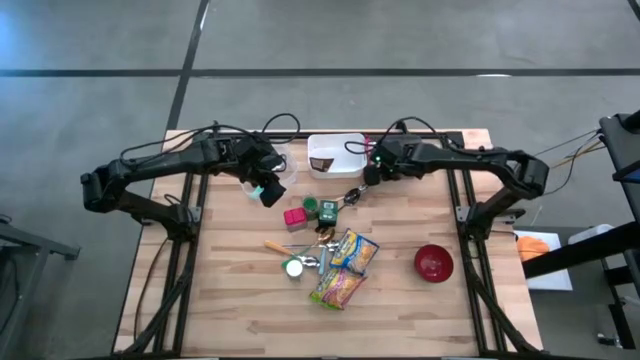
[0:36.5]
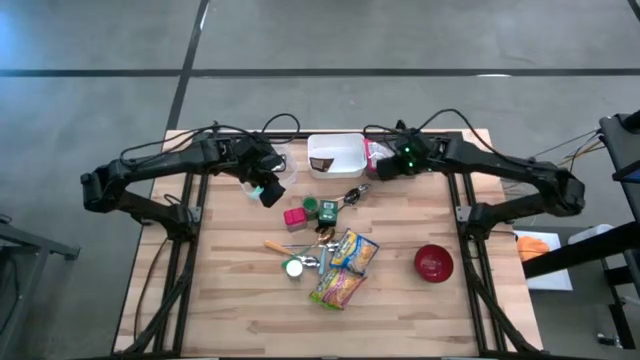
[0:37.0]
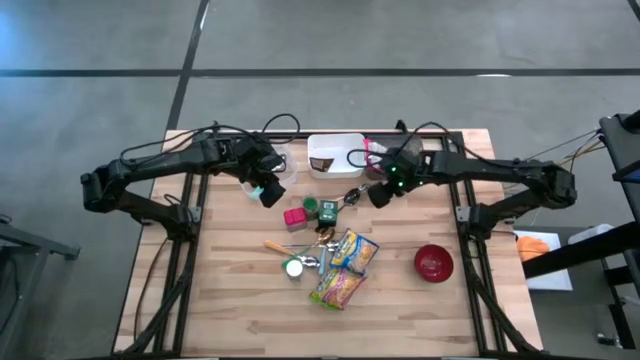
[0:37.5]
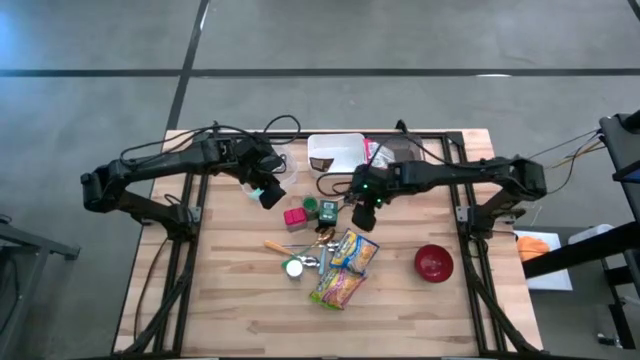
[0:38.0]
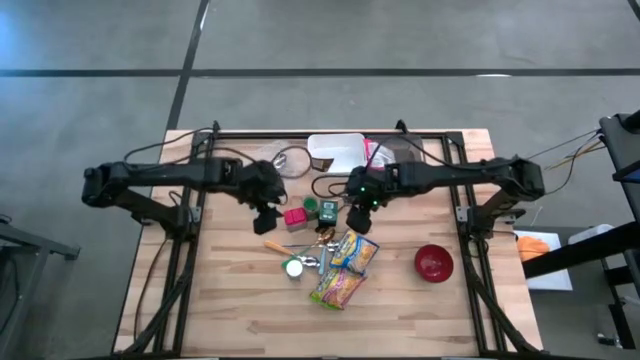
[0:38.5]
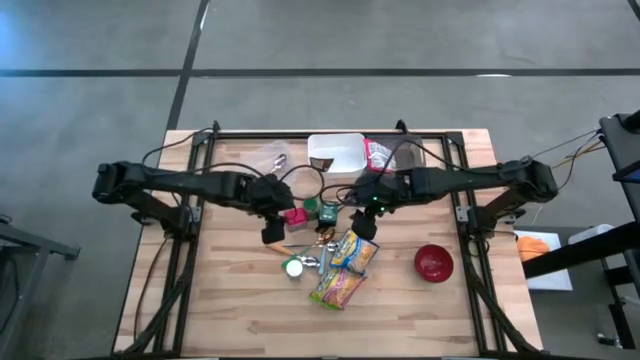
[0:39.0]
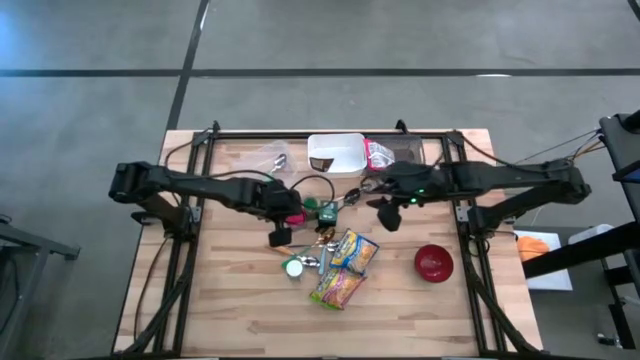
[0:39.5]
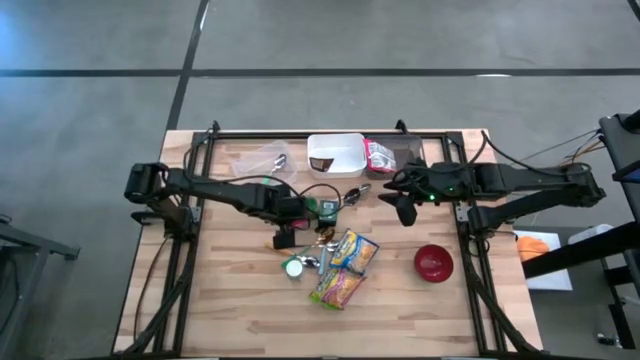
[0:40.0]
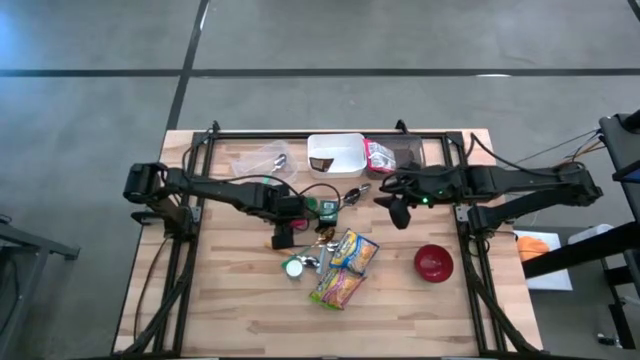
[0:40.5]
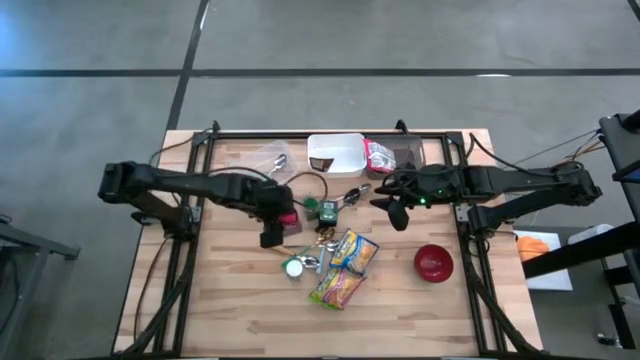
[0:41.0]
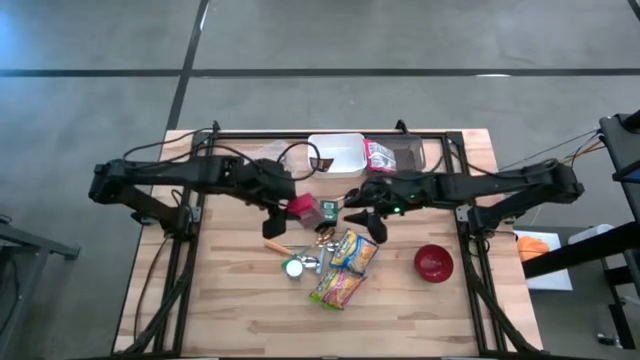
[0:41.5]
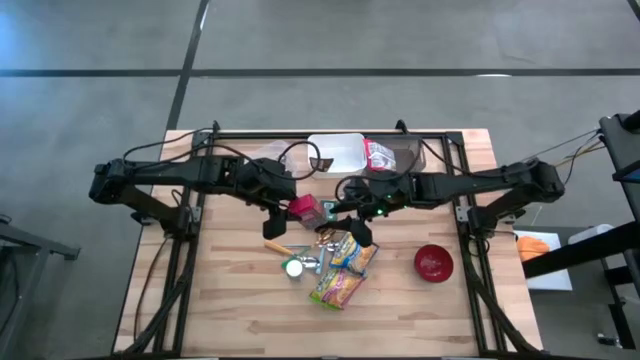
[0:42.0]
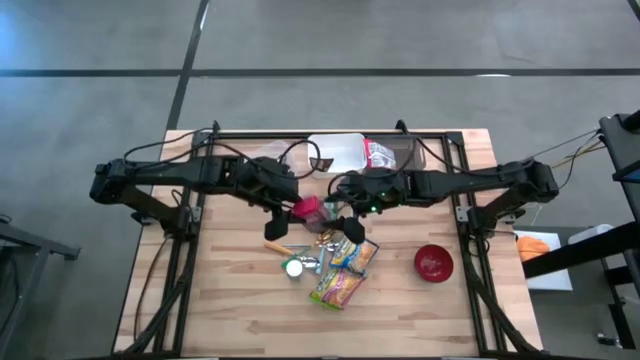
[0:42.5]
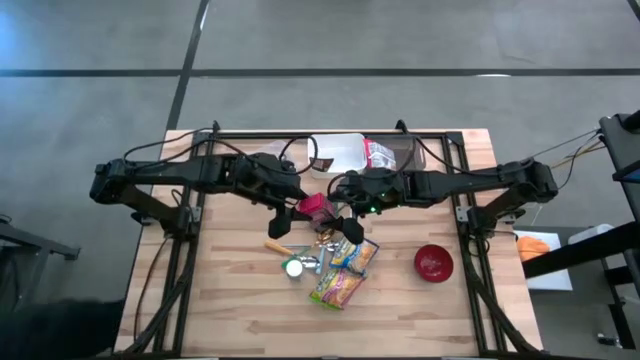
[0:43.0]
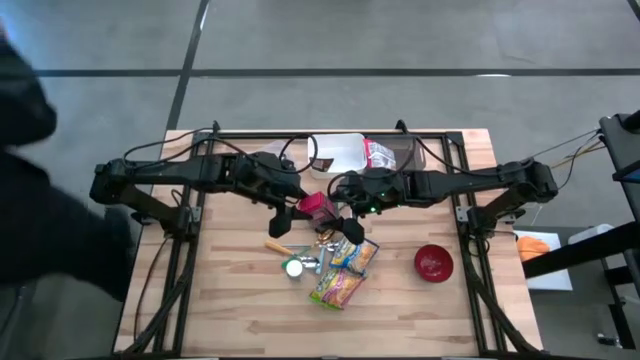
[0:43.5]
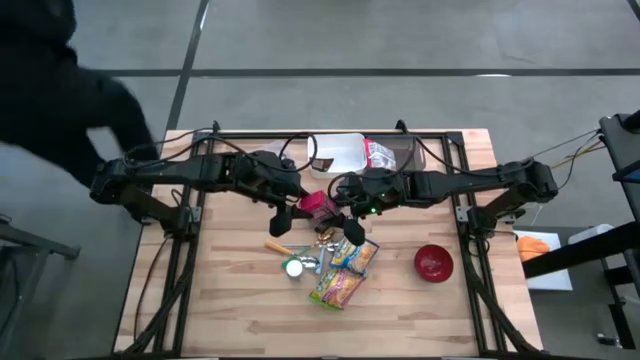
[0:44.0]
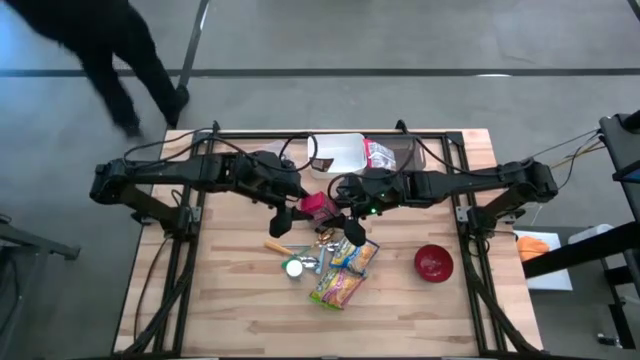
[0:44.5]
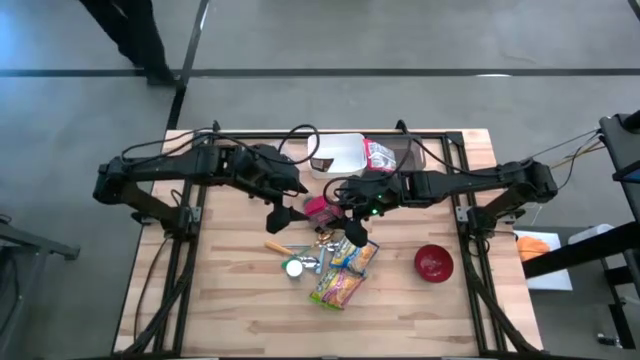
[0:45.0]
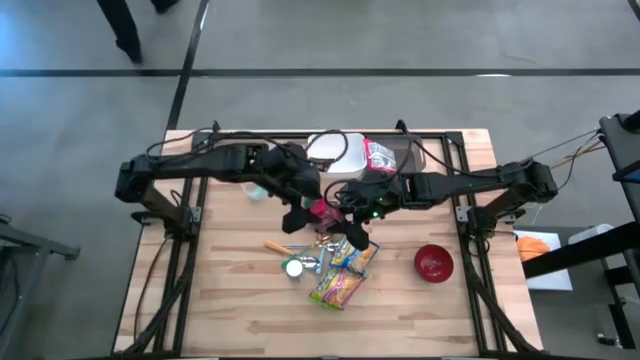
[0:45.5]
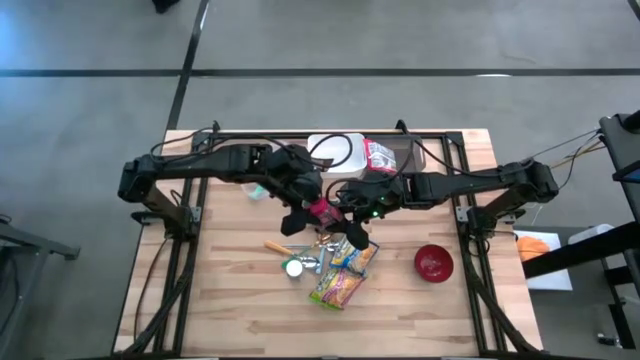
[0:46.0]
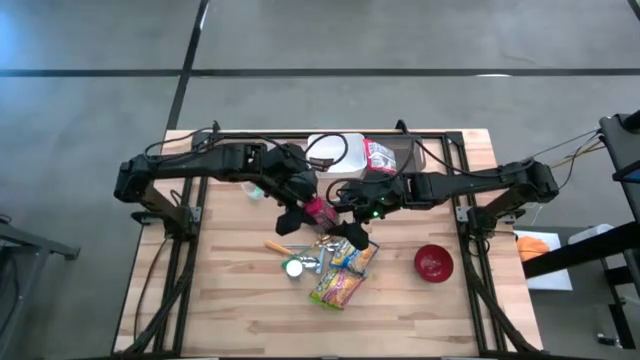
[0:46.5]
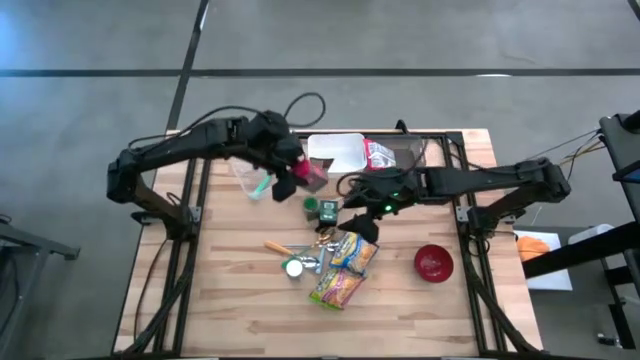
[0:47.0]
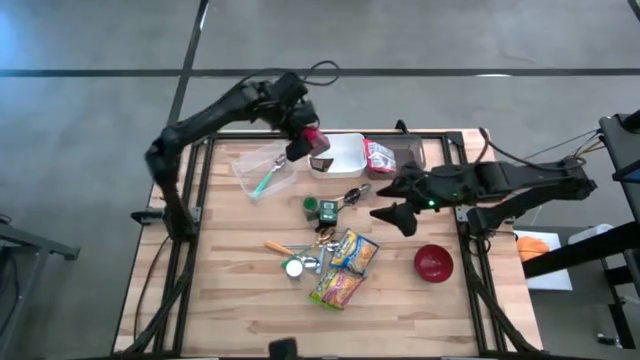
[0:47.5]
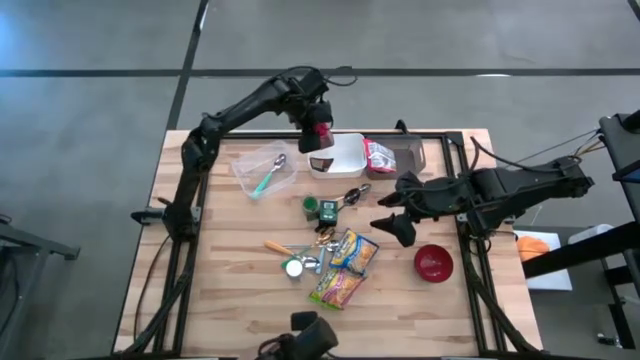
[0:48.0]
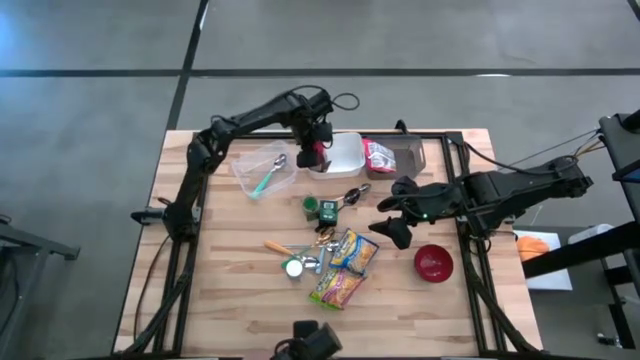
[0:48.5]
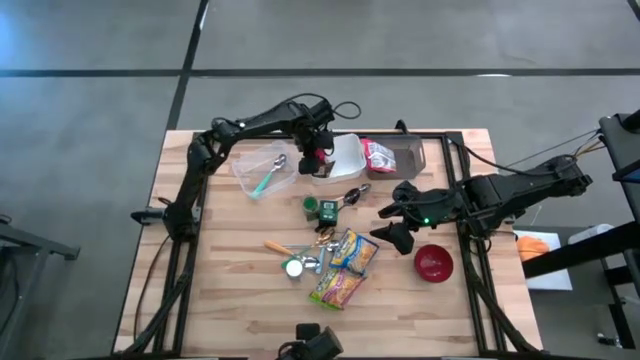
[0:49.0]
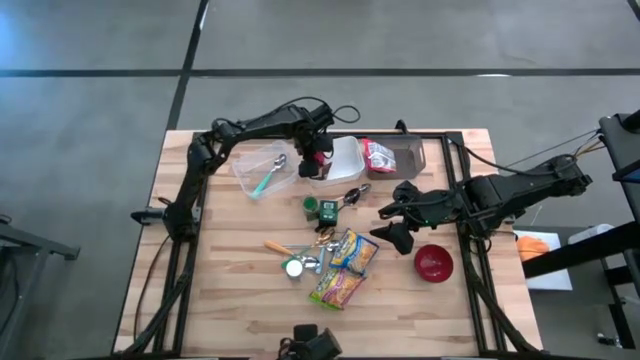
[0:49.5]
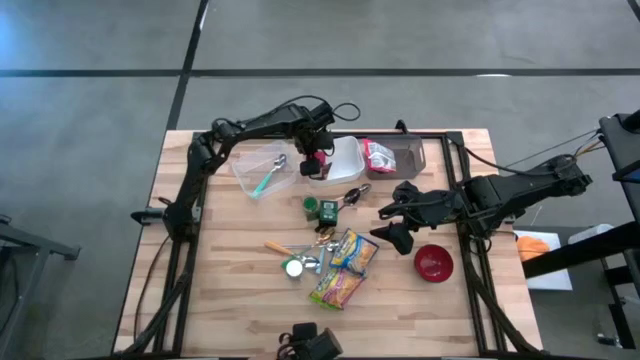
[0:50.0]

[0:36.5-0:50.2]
Put the red seasoning can into the white bin
